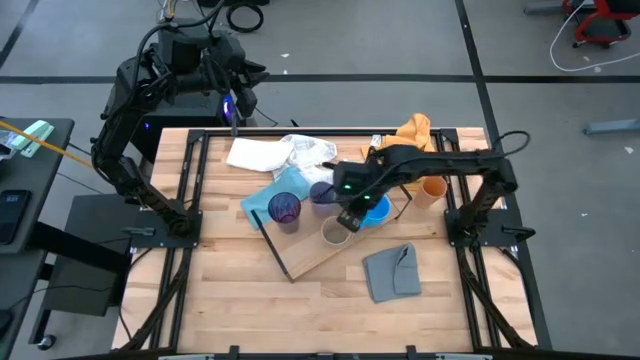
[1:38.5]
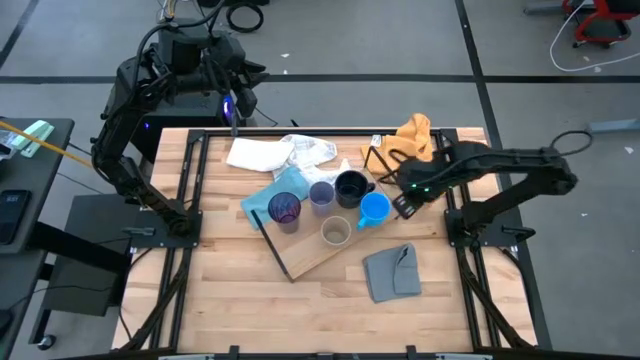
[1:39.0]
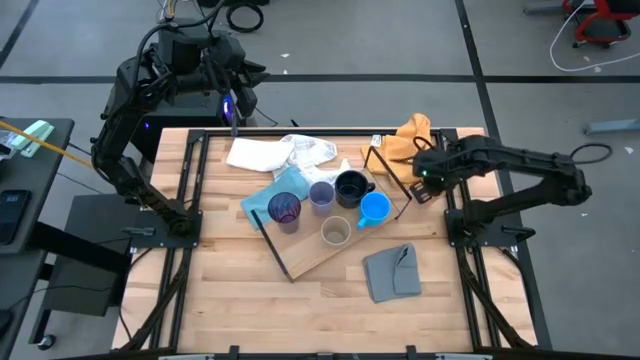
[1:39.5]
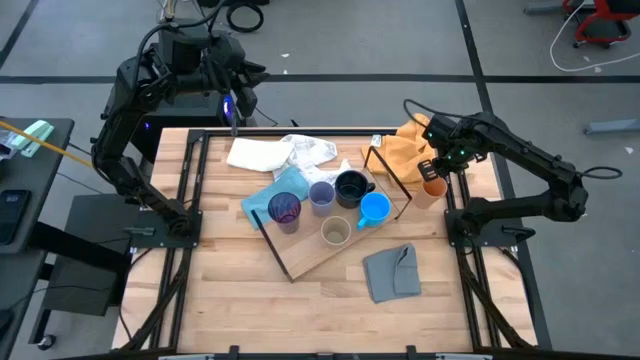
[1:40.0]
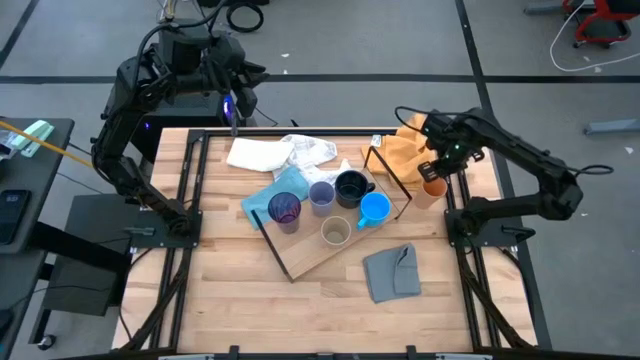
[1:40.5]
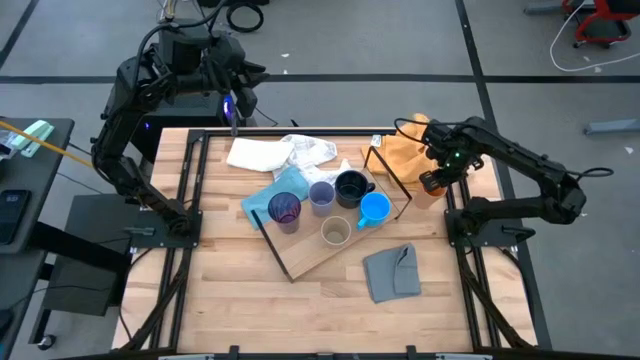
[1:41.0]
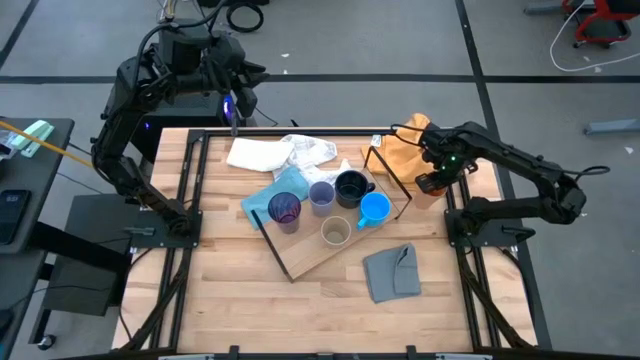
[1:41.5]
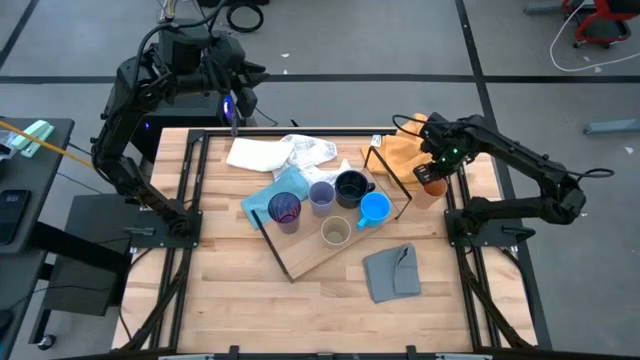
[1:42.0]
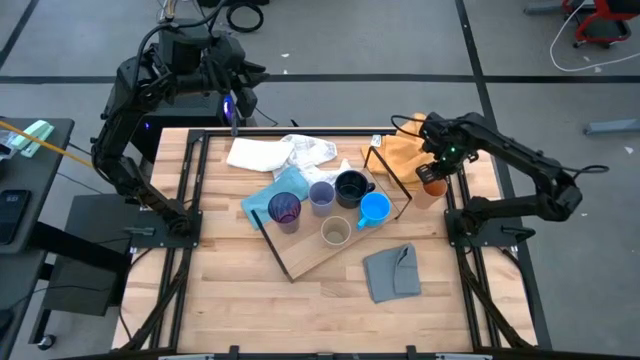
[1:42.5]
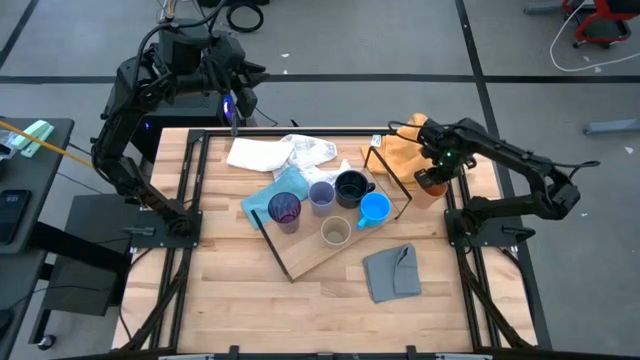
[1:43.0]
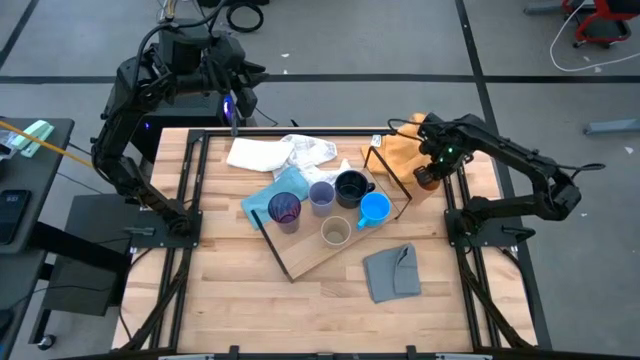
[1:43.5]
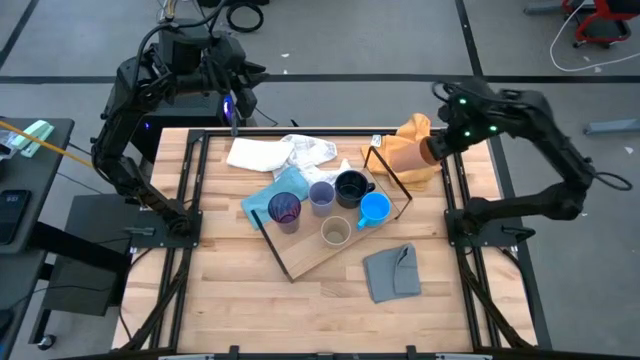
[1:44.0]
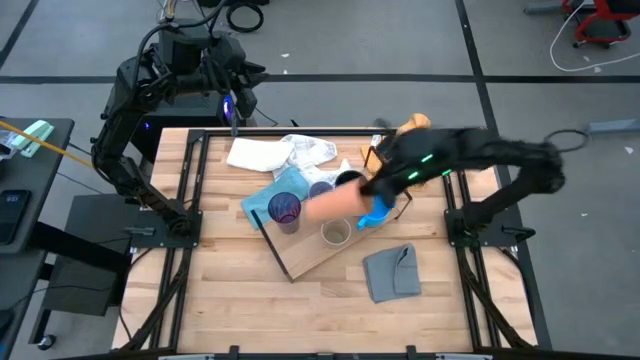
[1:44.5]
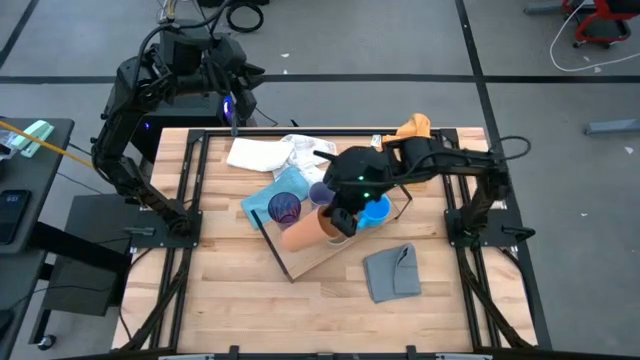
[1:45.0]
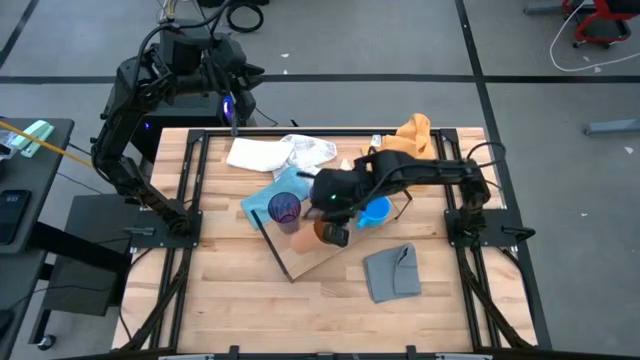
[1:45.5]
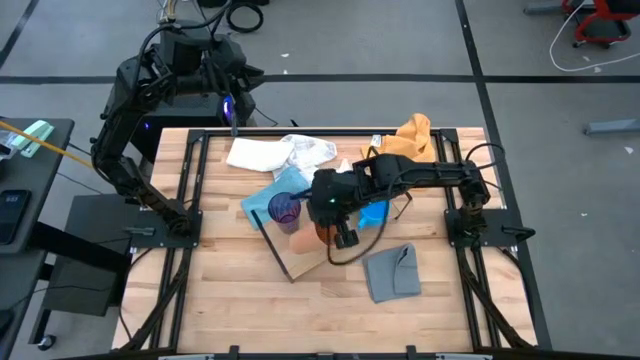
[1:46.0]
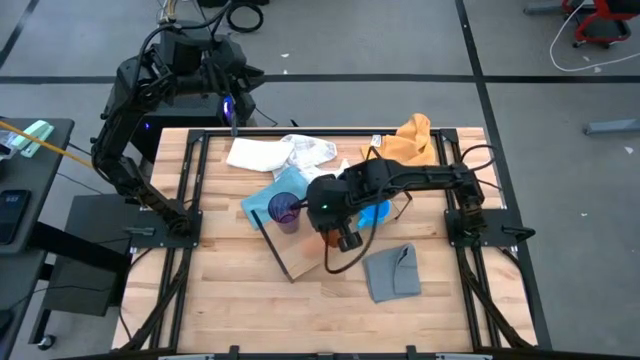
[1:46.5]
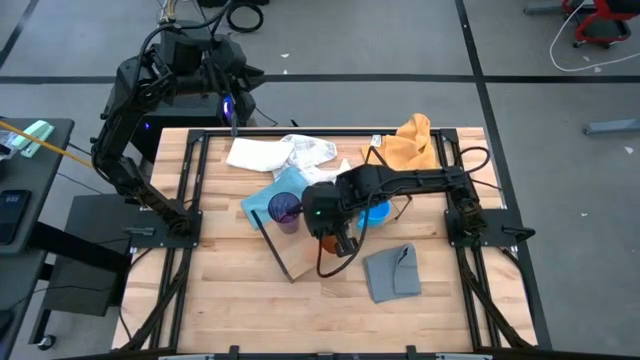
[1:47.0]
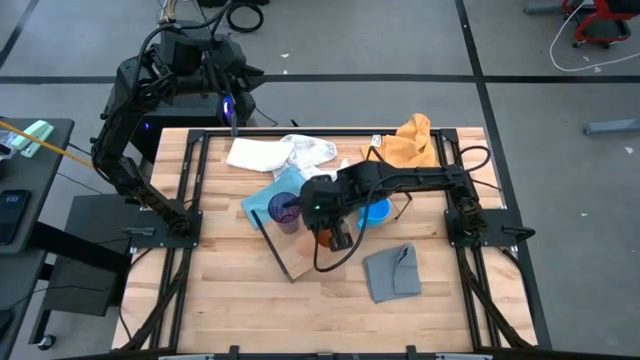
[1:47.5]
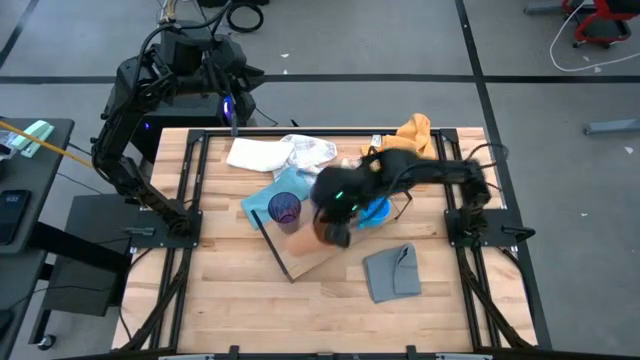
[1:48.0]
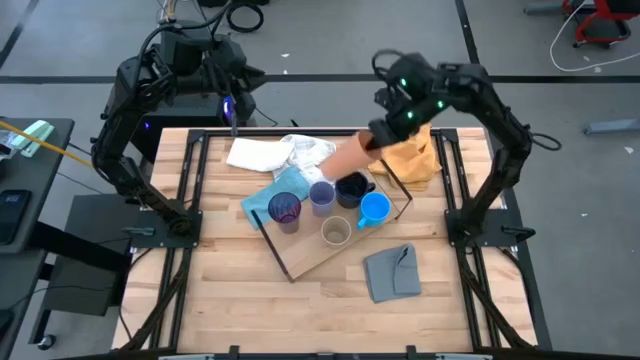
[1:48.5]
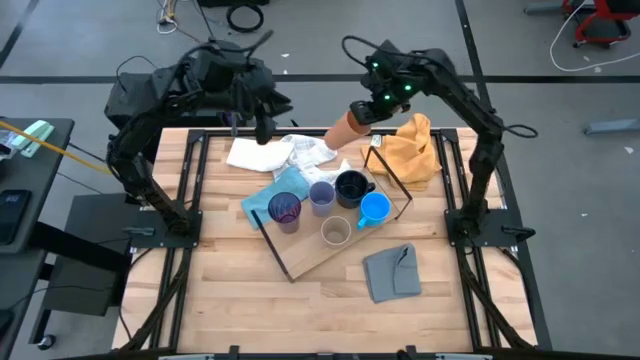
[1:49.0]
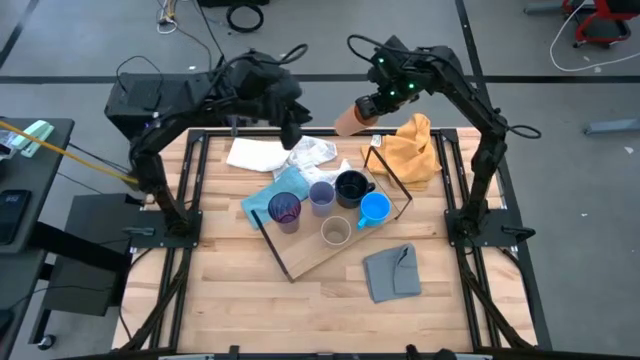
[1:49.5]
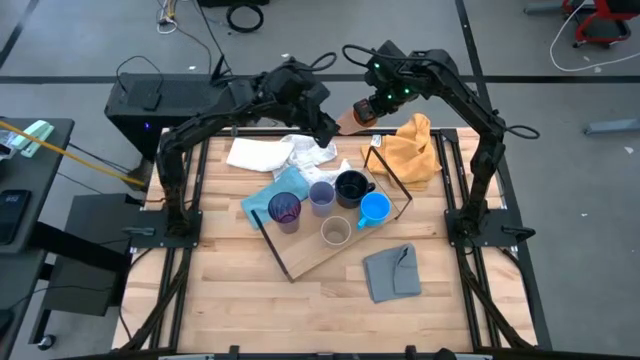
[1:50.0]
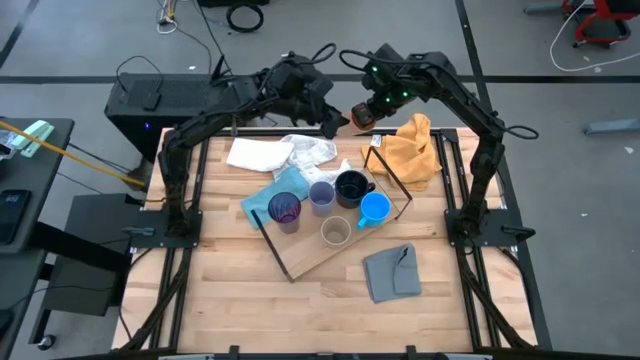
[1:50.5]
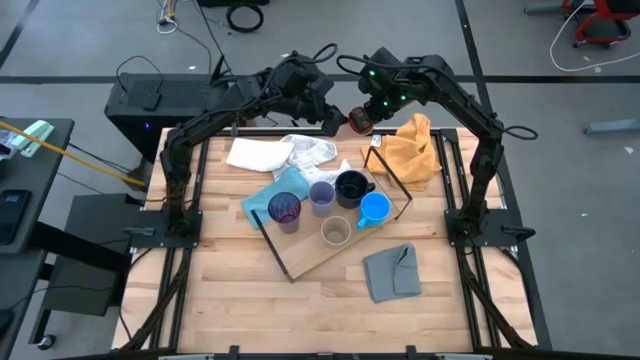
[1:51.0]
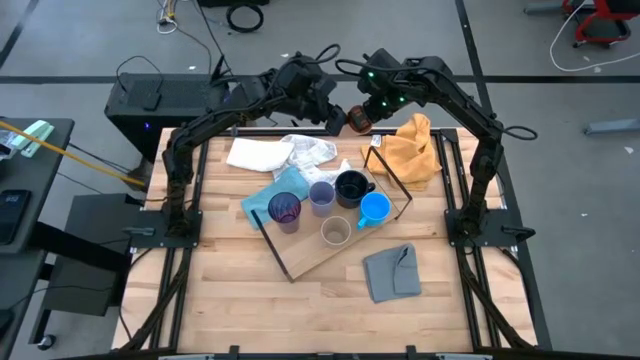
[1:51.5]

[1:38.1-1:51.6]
Task: Stack small to large cups/mugs on shelf
Put the orange cup on the shelf

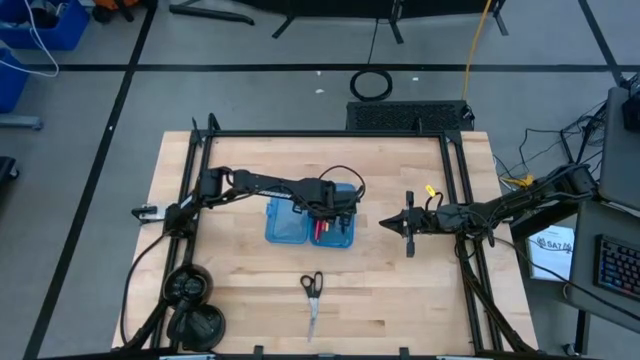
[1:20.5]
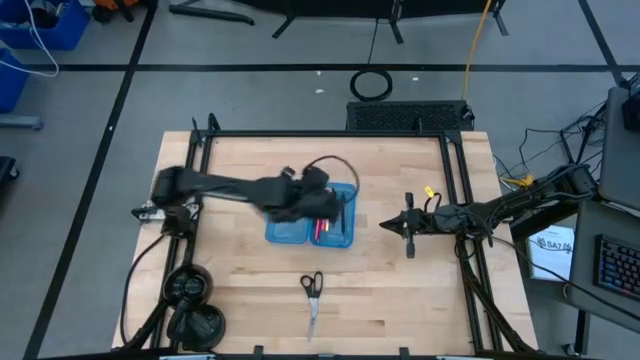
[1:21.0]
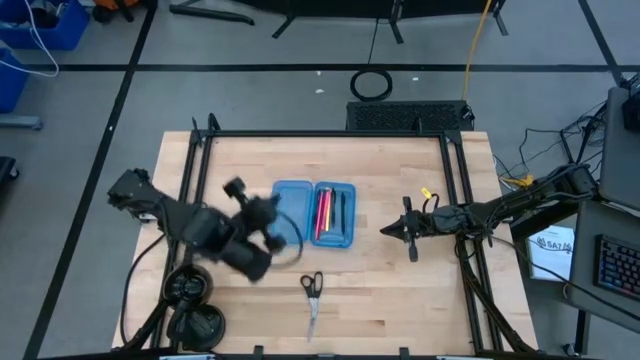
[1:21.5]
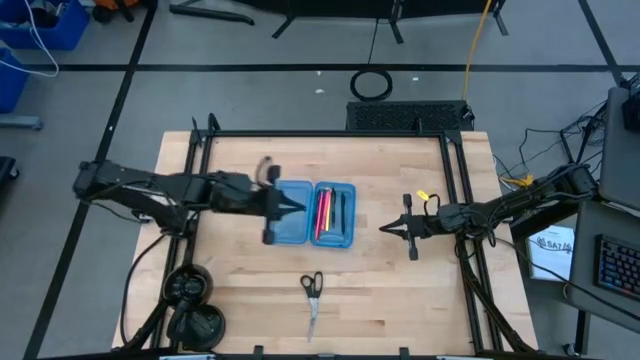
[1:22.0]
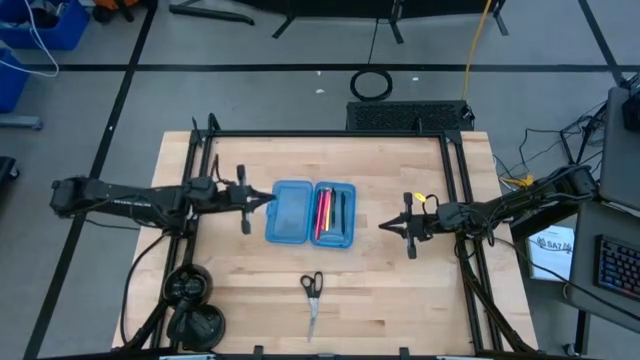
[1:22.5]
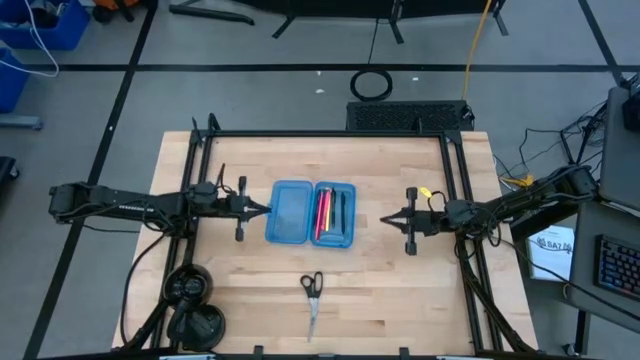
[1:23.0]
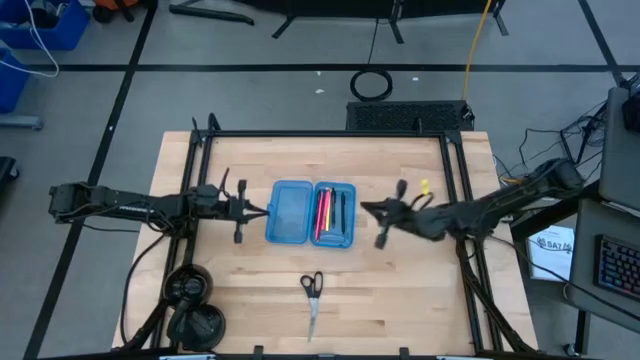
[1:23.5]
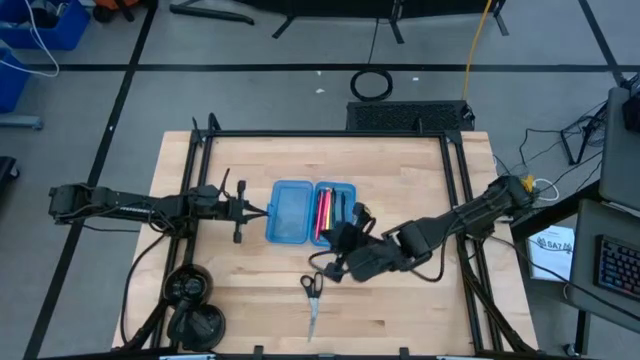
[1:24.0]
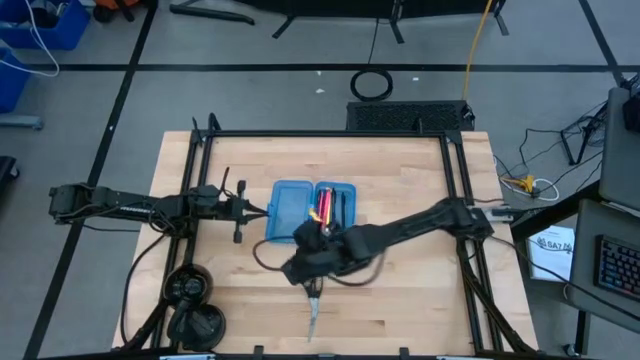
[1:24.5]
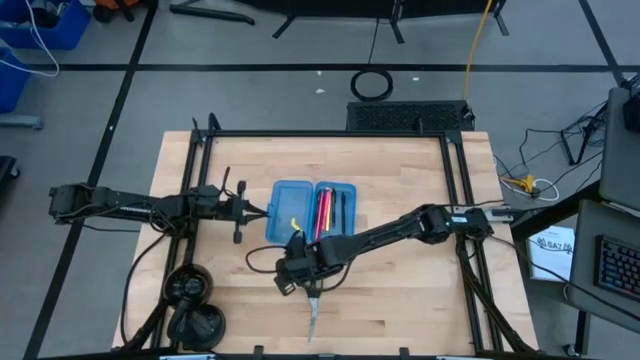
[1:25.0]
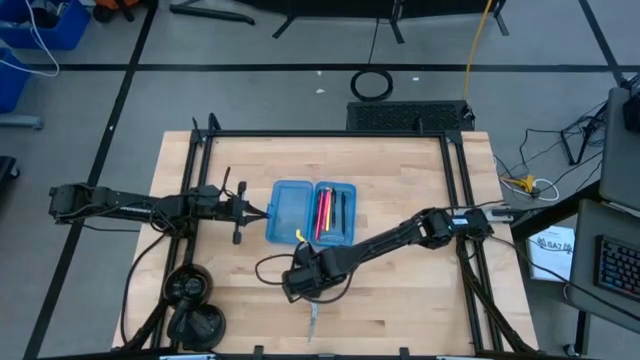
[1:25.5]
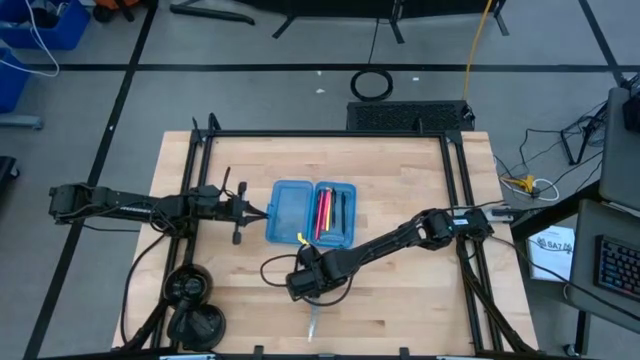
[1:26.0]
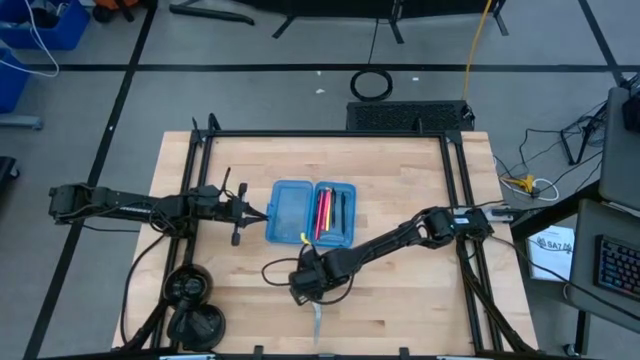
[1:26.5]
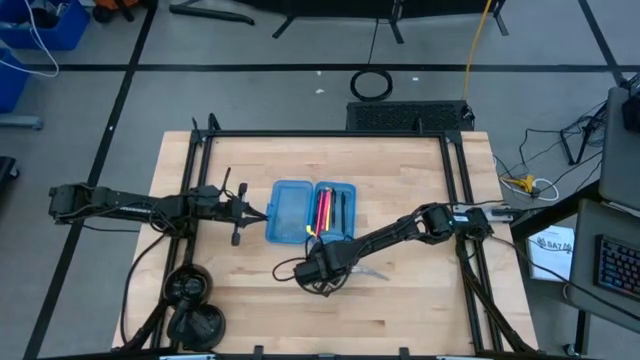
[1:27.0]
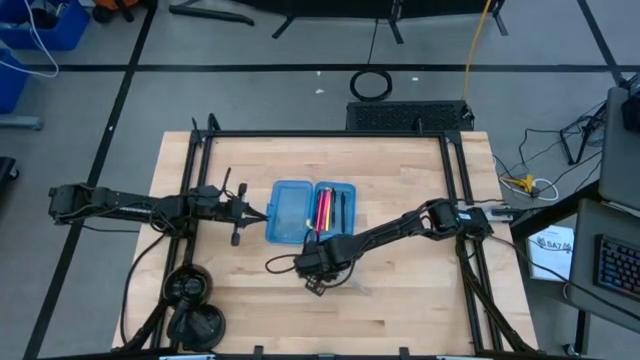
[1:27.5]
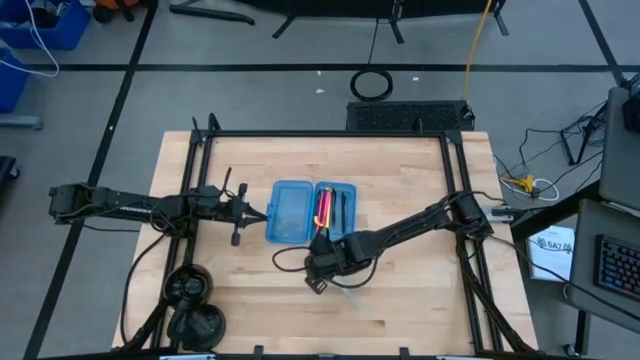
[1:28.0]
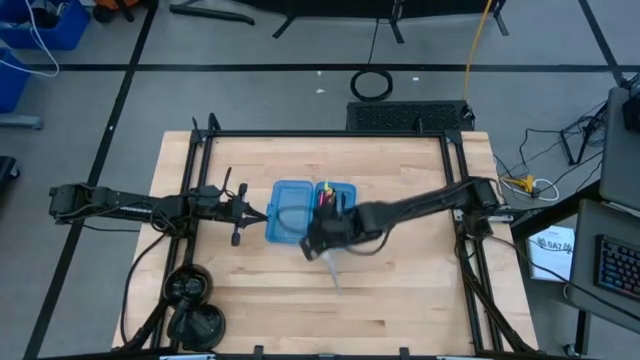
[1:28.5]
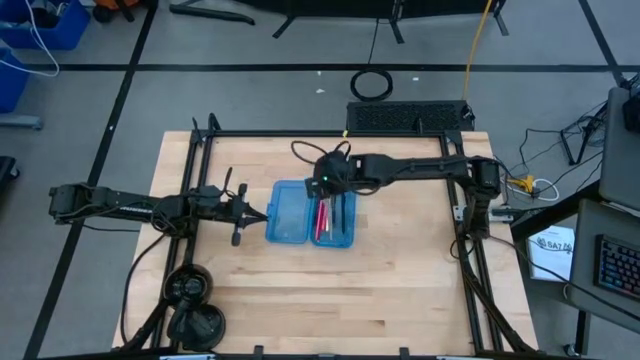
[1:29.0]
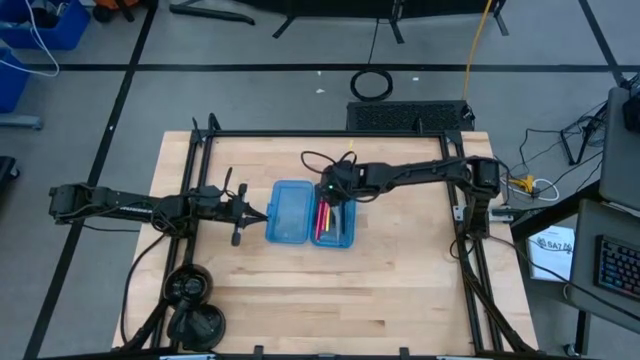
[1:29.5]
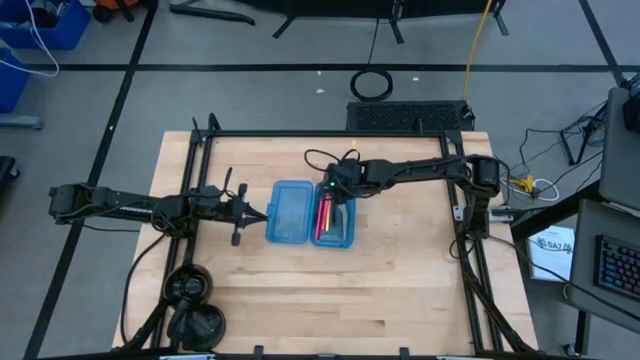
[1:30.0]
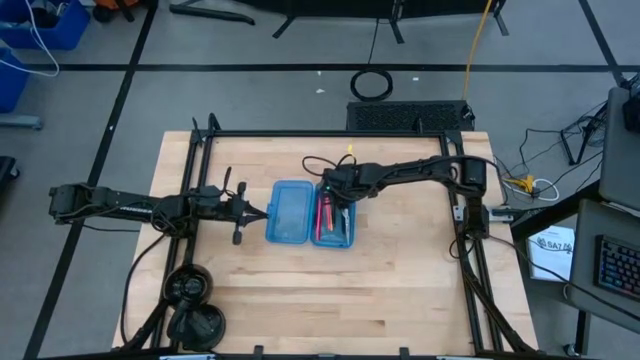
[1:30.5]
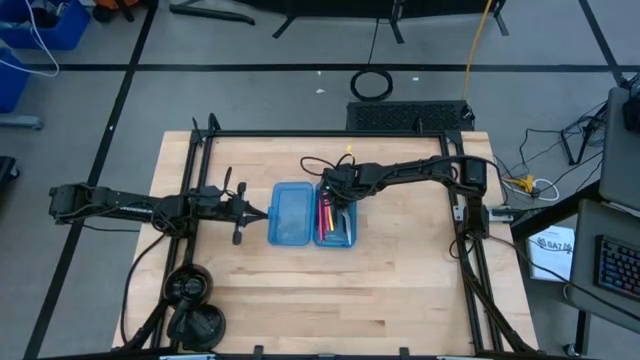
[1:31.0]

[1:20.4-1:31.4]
Task: Pick & place school supplies into a supply box
Put the black scissors into the blue supply box
